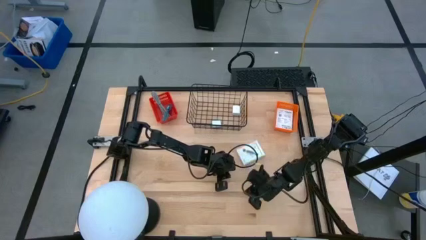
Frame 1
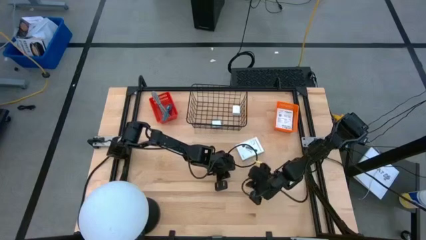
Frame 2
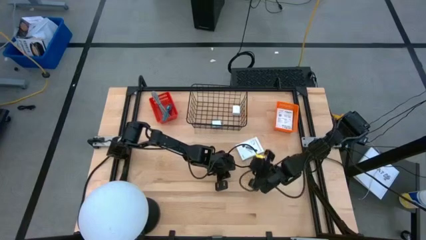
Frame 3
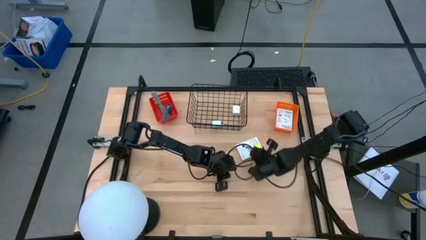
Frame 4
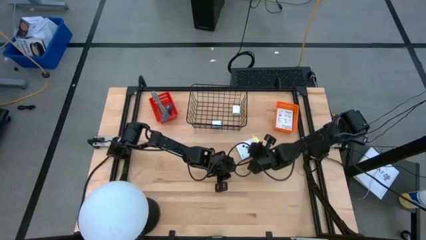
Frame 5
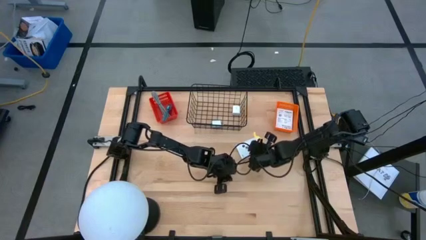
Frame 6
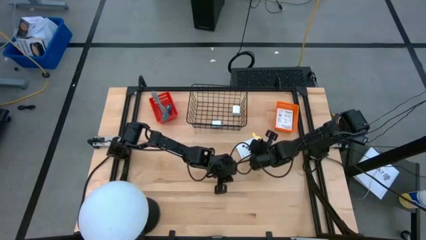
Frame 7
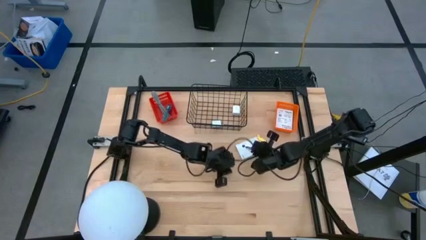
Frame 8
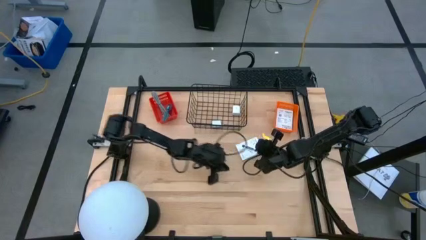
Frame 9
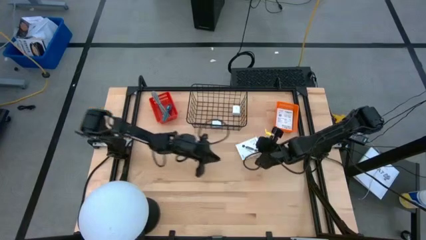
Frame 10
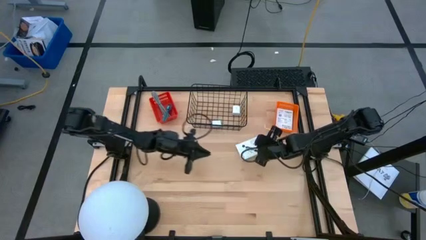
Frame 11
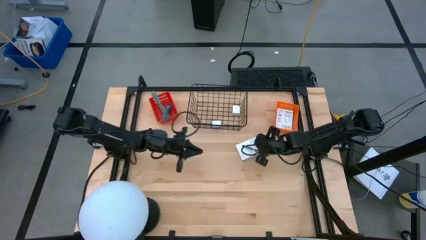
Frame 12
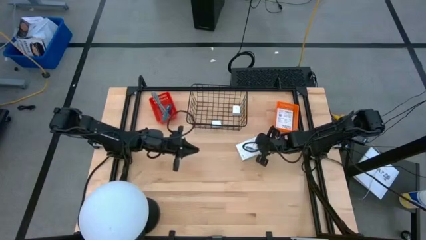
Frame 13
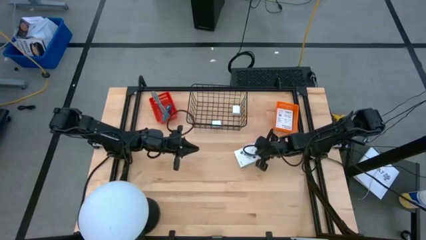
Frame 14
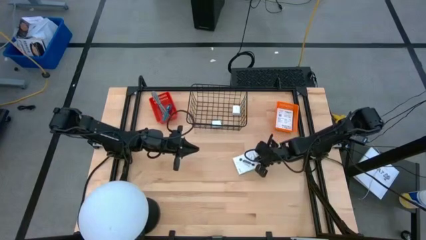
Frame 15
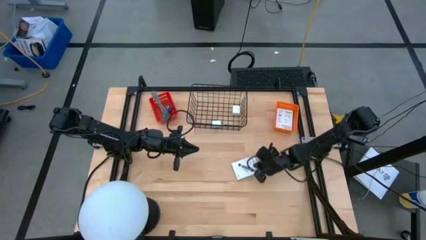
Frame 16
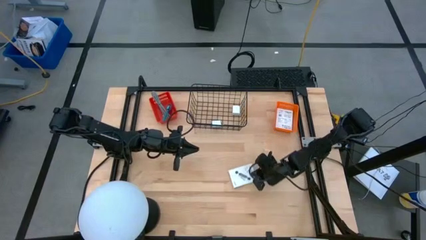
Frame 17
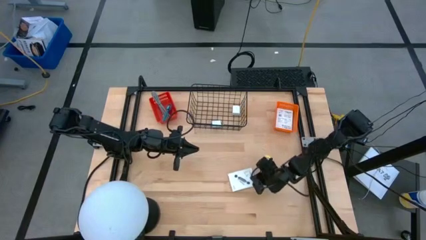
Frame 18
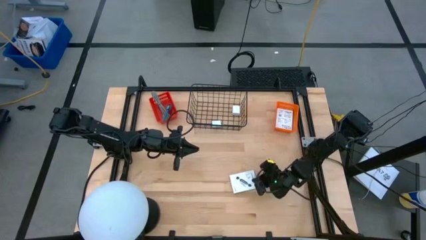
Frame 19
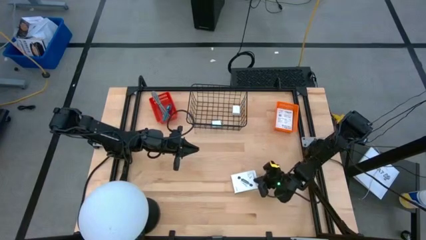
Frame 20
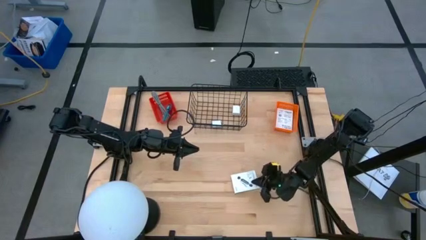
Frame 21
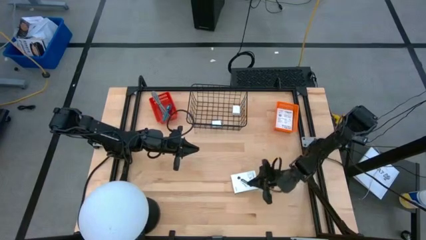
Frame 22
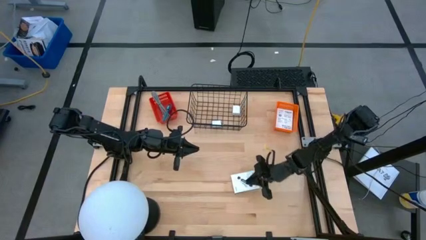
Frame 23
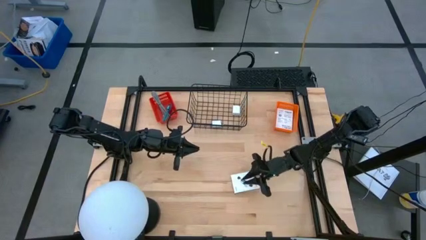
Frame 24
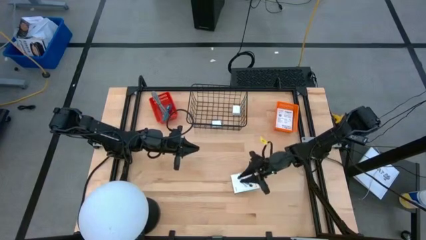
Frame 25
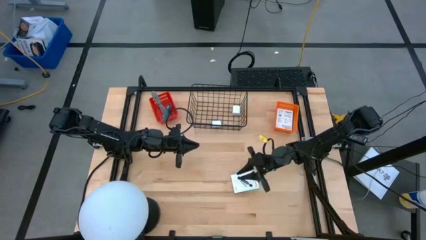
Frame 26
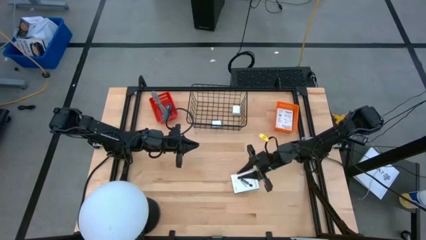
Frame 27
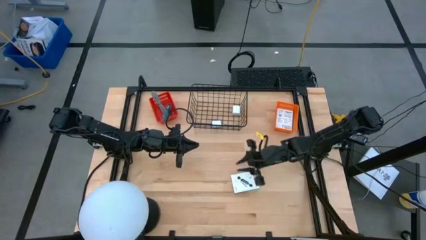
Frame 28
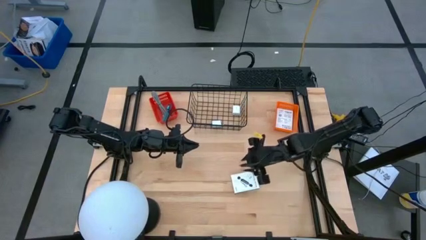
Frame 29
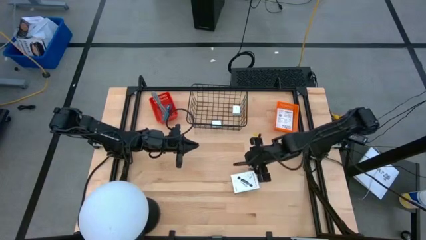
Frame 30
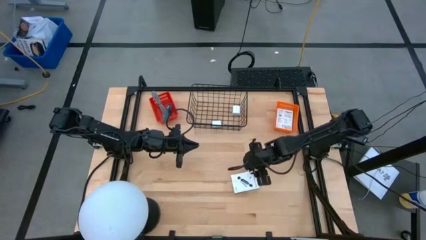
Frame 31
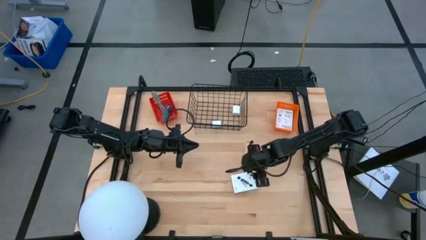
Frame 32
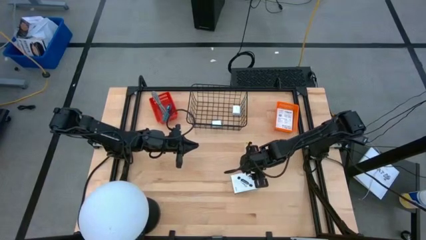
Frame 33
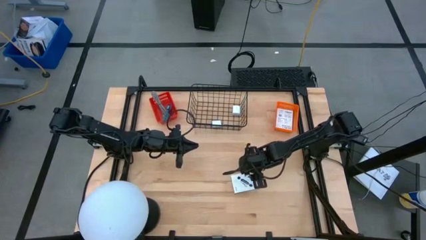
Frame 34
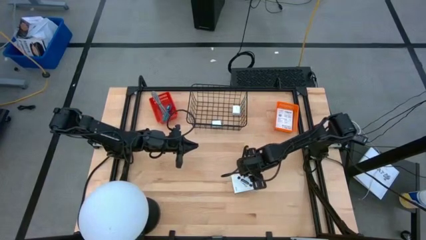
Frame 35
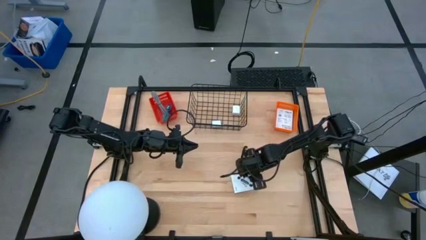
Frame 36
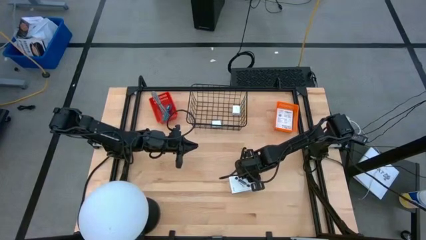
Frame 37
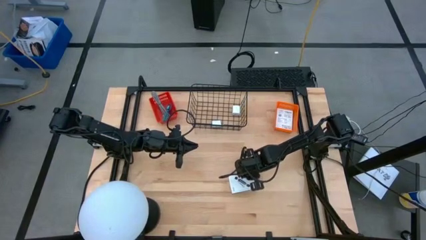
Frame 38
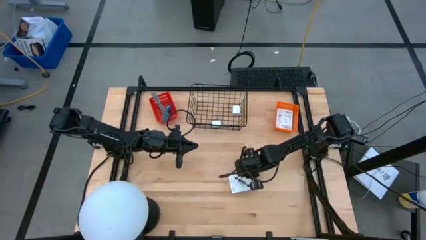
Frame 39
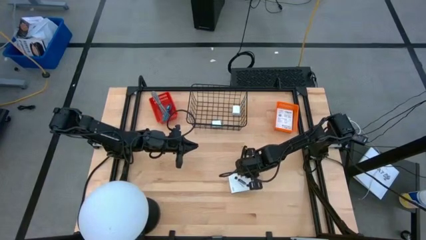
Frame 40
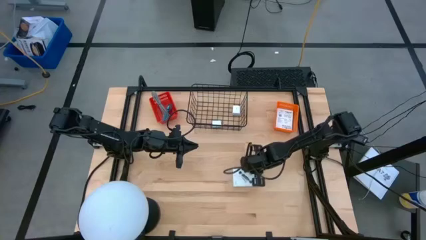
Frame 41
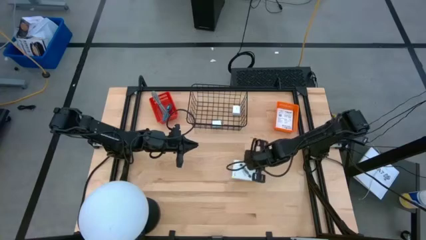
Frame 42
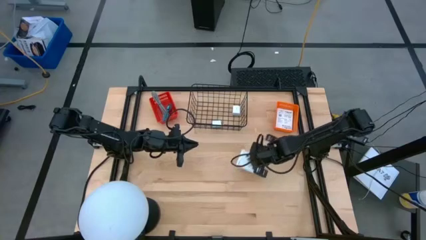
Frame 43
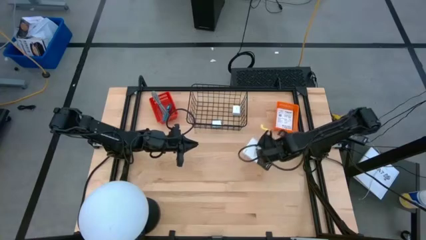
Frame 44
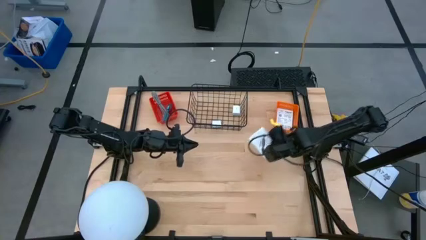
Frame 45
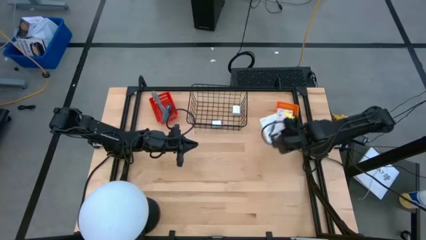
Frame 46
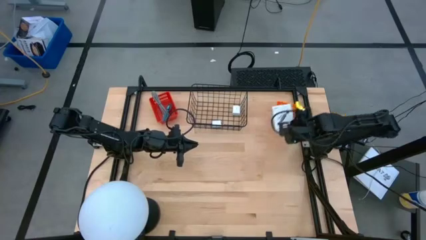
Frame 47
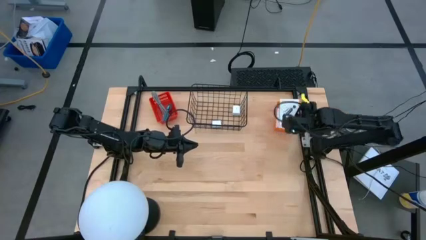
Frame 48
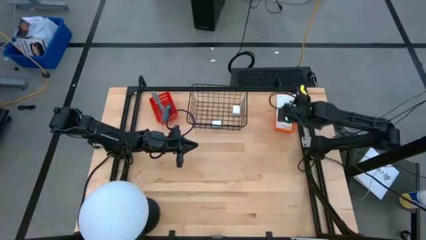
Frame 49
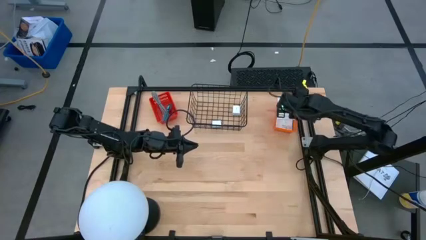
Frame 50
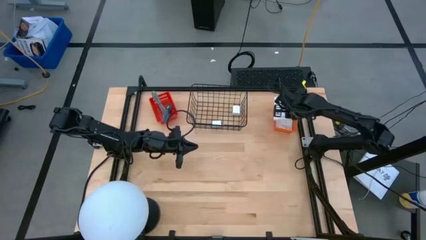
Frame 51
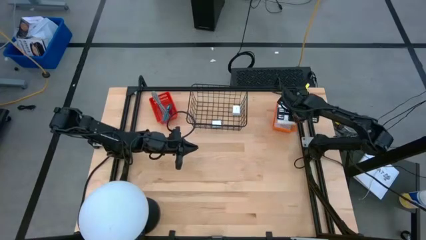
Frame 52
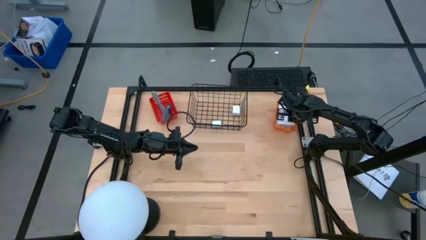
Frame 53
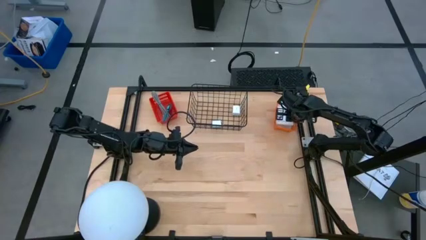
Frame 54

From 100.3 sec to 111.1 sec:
Task: Pick and place items into bin
Put the card reader box into the orange bin

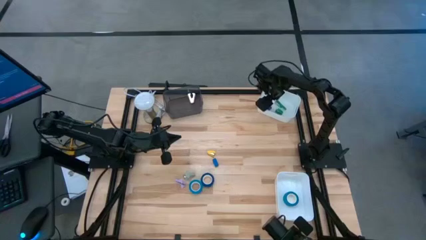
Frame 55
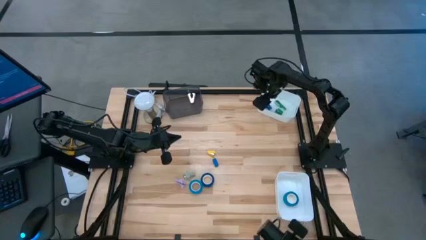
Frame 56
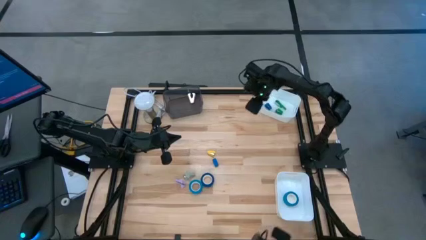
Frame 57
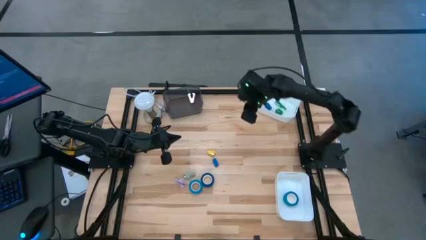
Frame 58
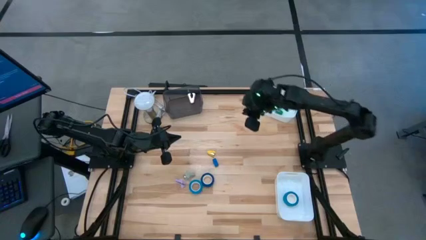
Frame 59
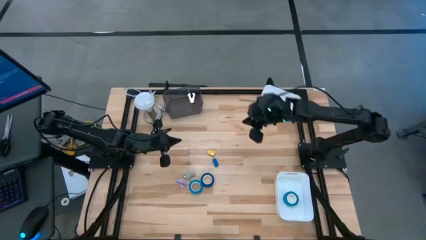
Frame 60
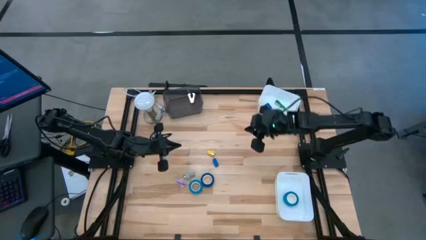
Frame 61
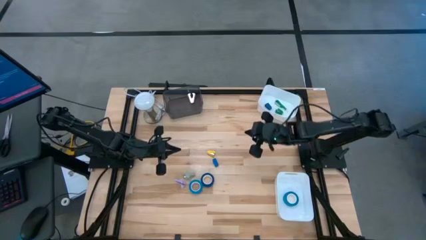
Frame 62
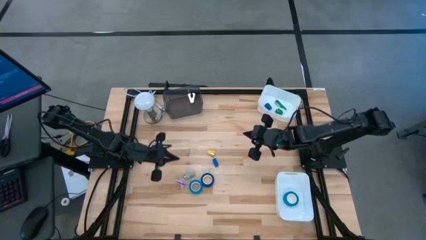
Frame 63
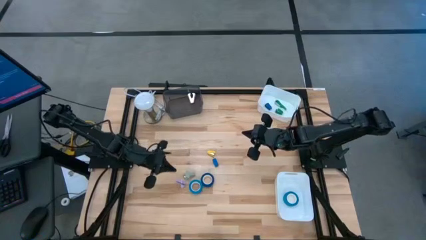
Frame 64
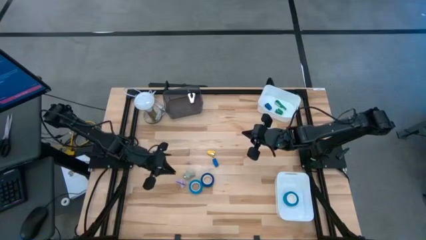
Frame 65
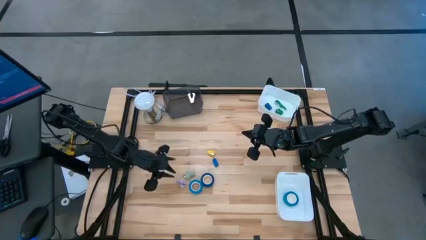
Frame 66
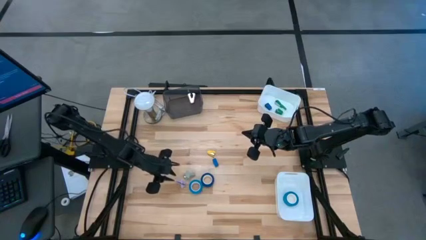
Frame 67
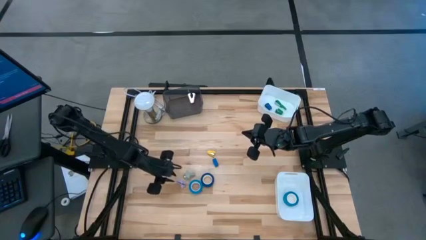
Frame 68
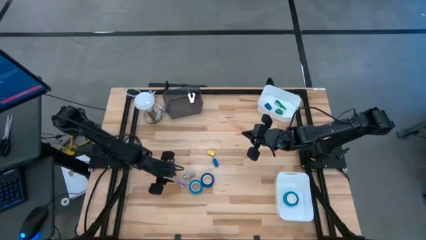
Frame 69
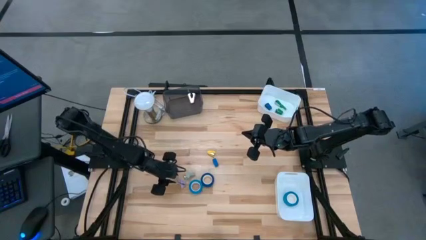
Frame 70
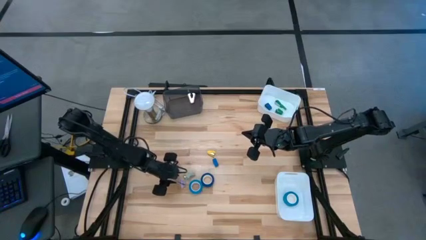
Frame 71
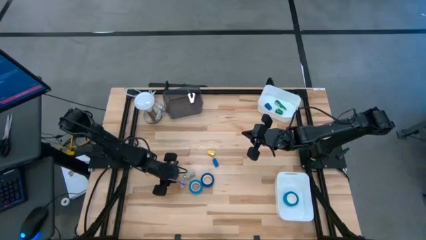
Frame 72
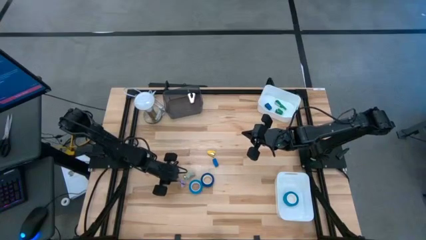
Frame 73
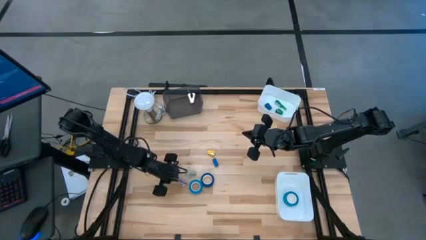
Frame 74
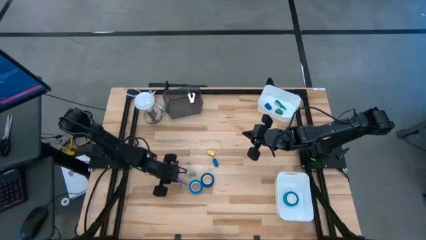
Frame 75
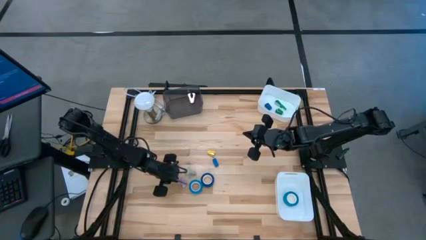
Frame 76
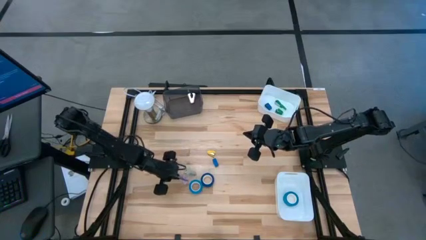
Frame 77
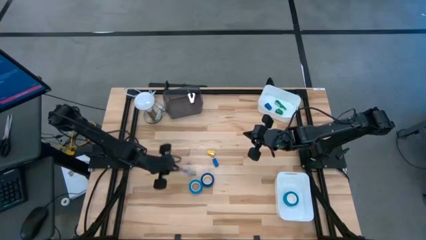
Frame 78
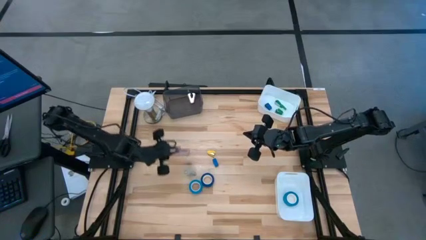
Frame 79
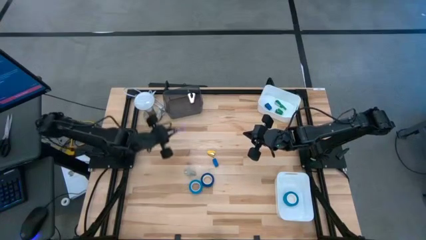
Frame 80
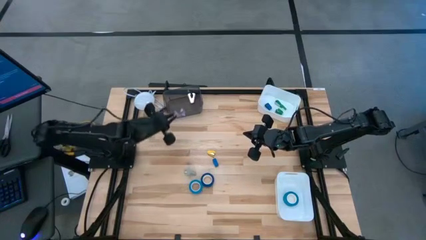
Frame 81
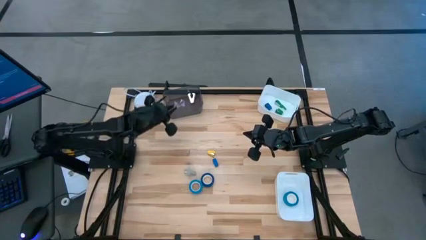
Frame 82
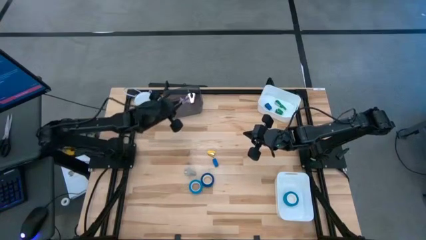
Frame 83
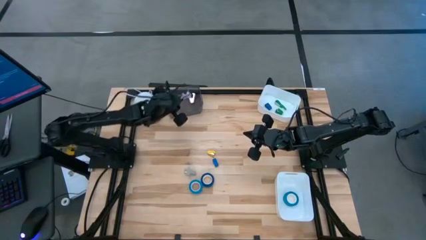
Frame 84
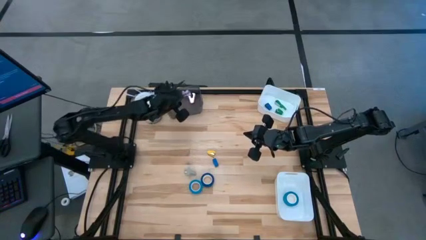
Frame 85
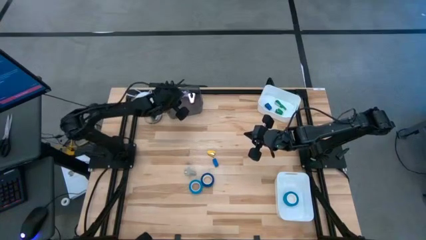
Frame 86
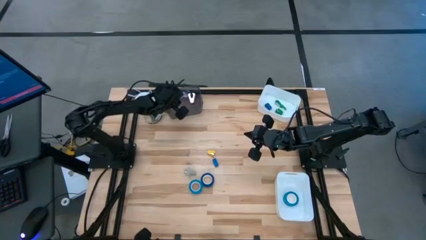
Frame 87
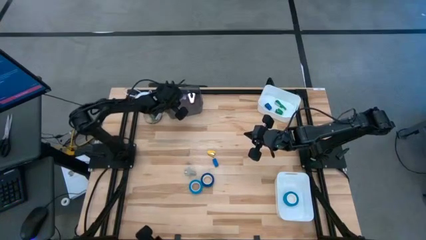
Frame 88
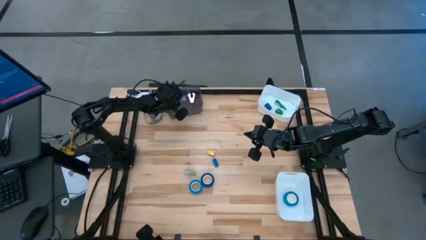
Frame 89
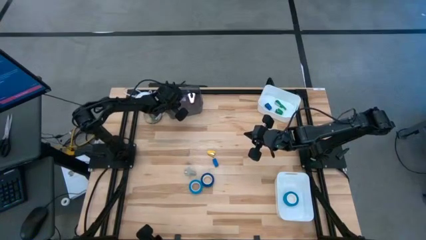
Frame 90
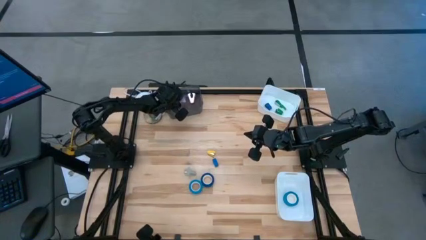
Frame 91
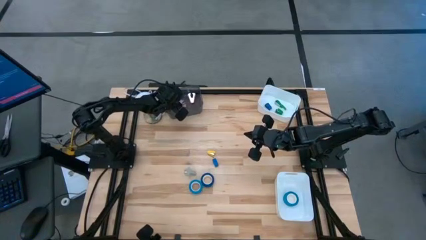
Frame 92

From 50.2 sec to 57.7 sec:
Task: Pick and place Stapler, Stapler remover, tape
Put the light purple staple remover into the black bin
